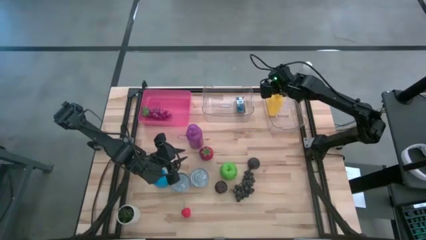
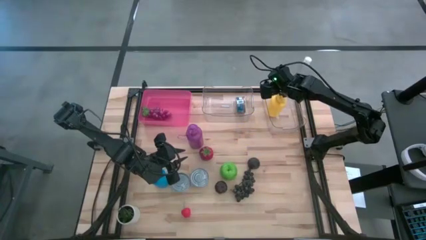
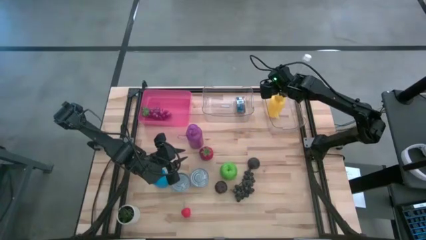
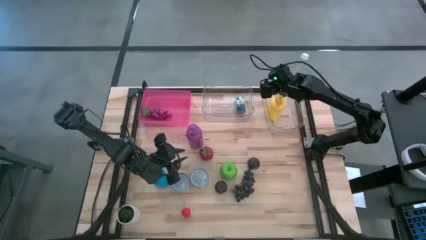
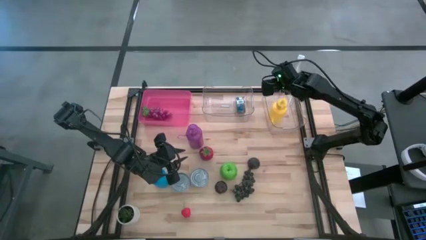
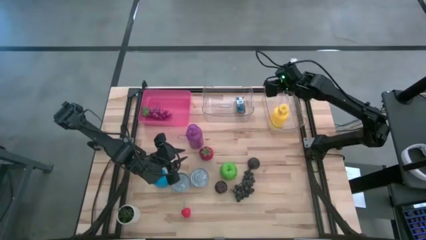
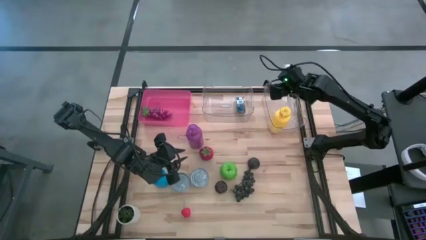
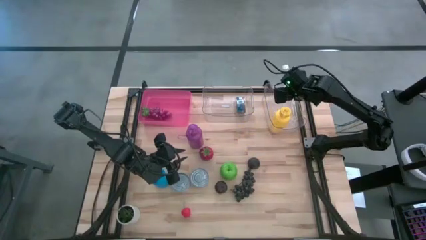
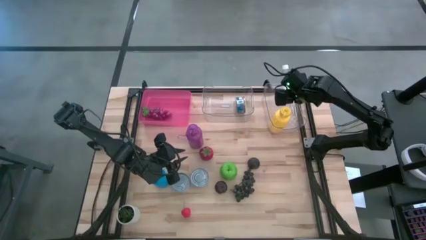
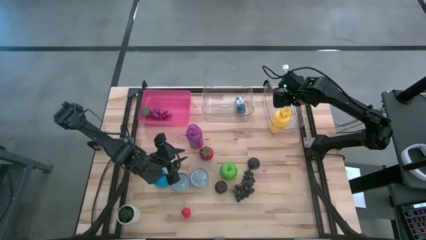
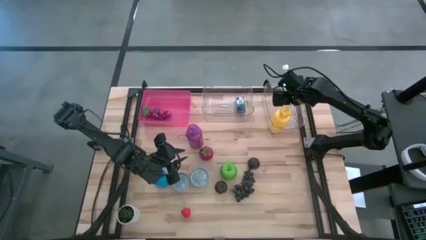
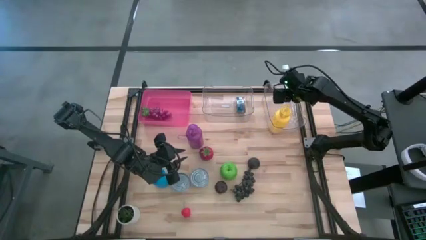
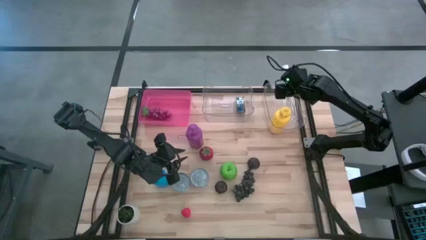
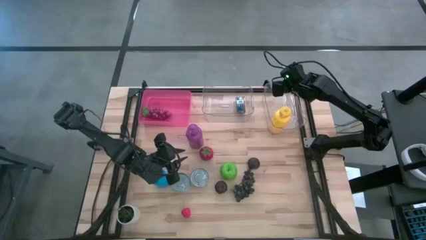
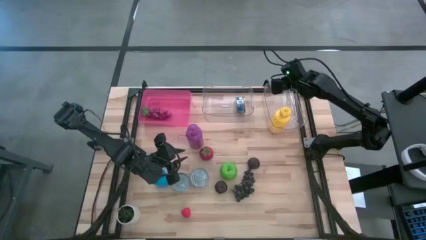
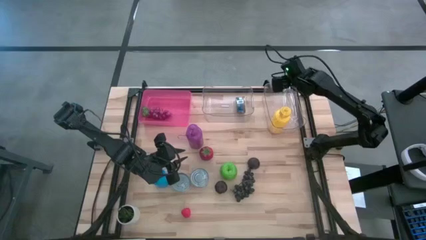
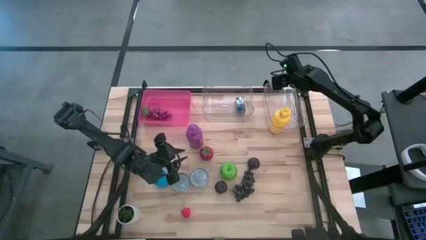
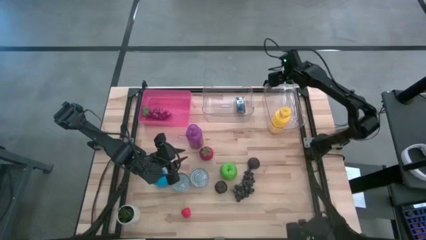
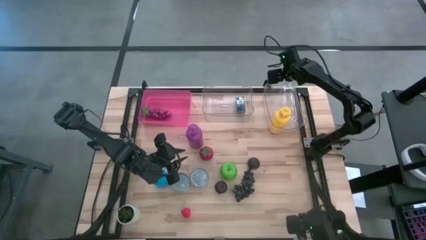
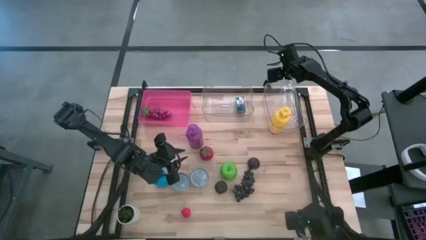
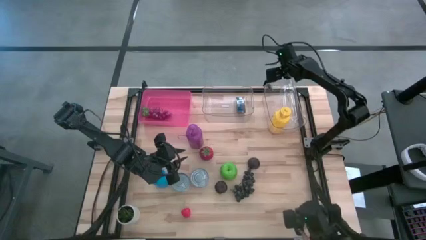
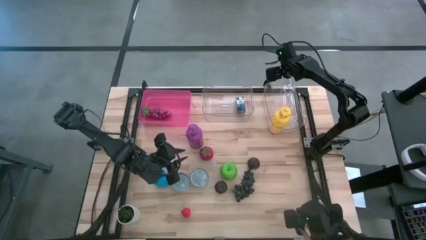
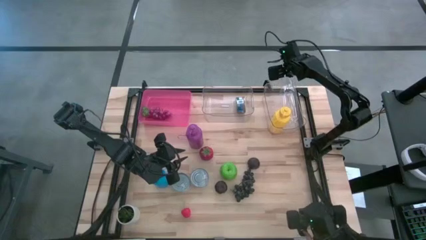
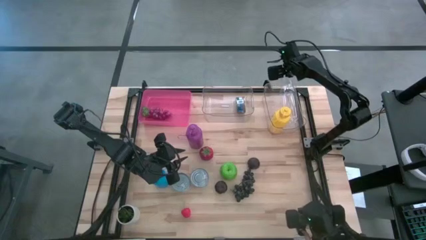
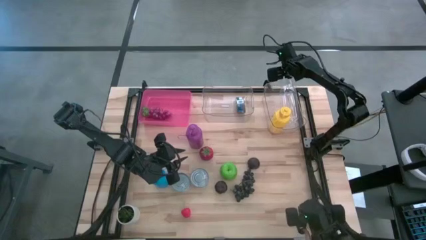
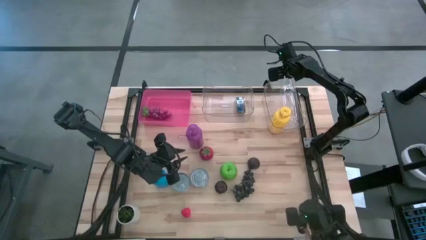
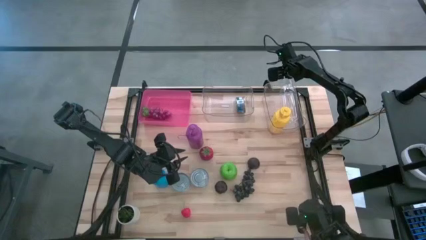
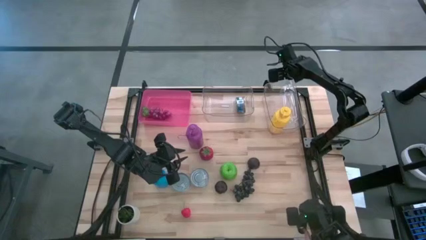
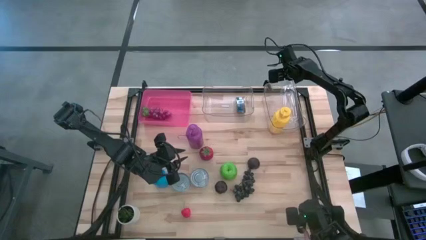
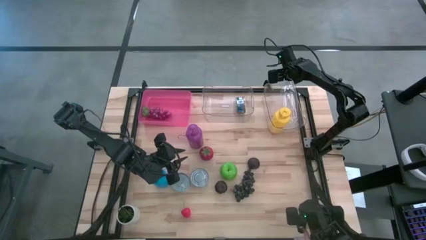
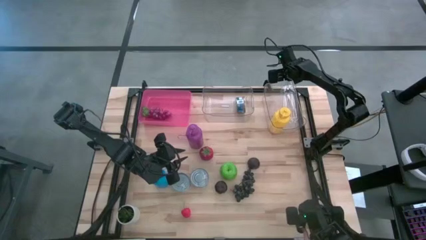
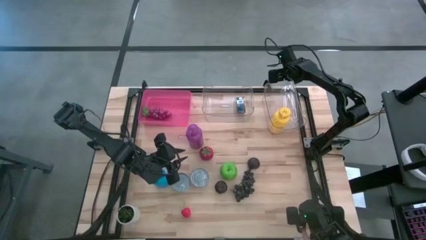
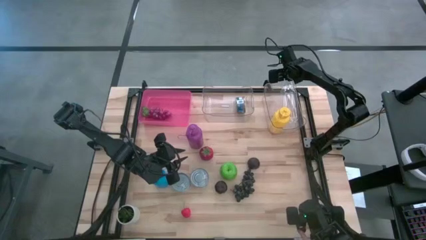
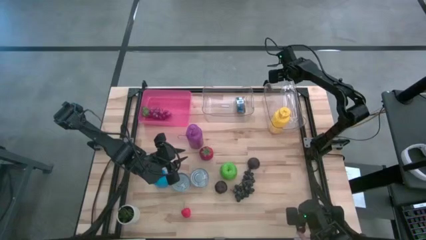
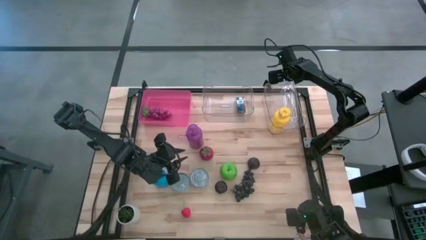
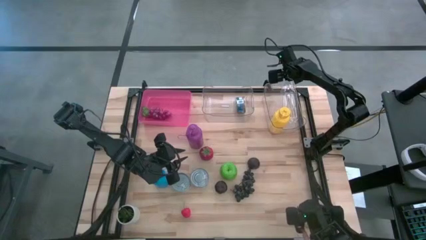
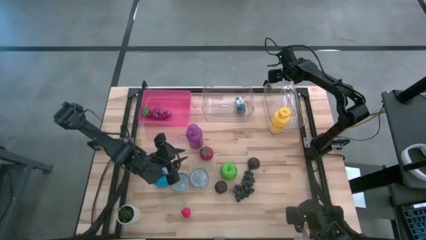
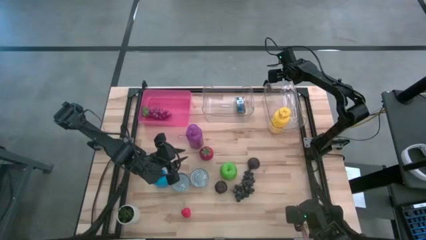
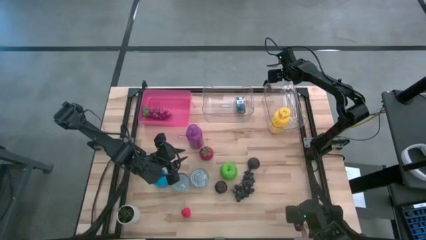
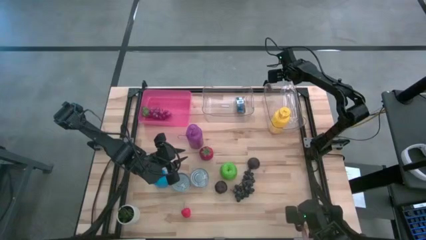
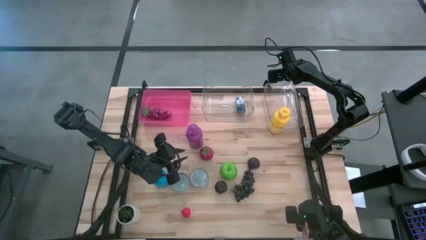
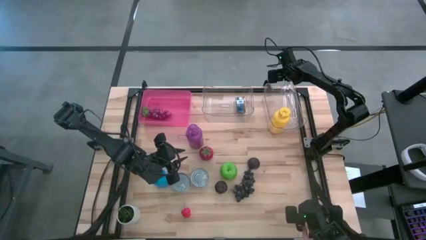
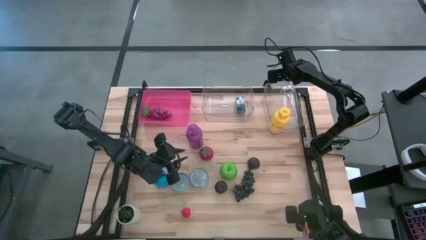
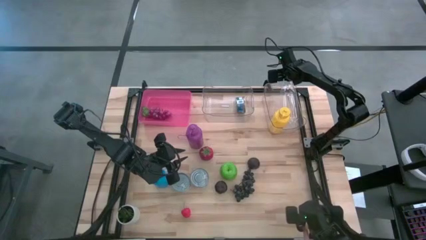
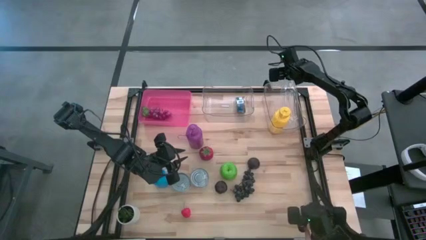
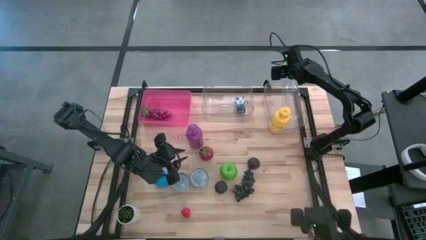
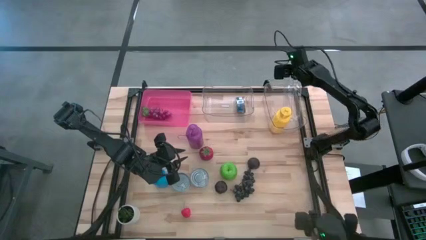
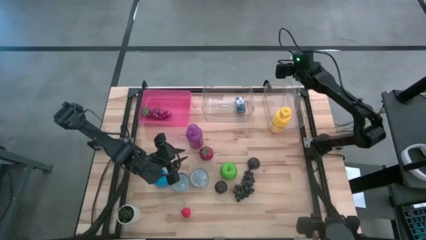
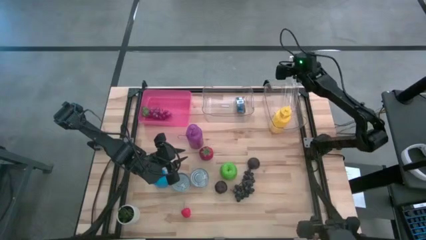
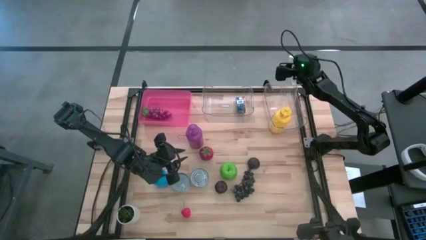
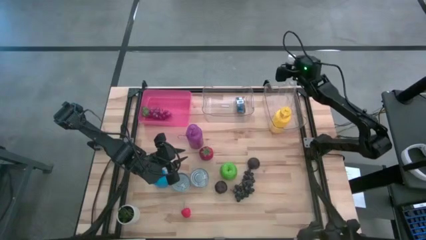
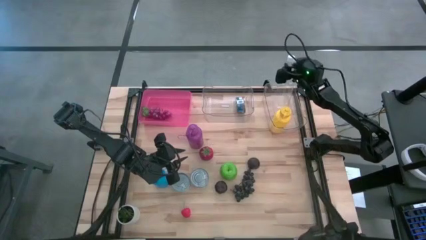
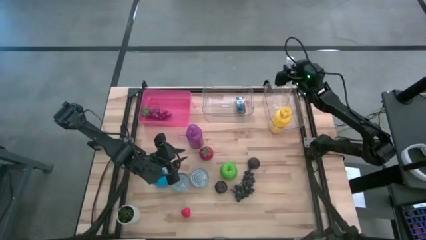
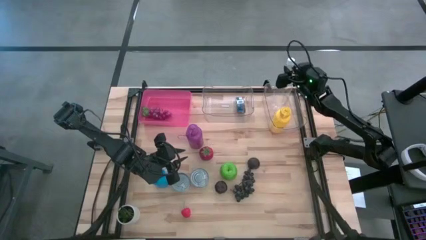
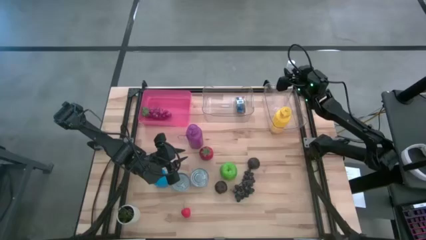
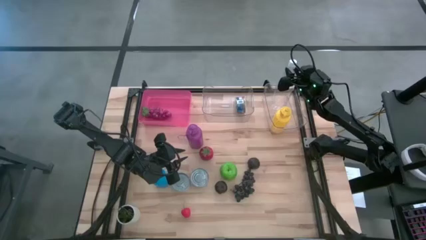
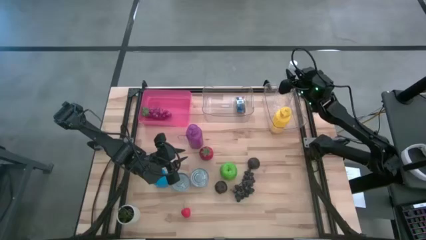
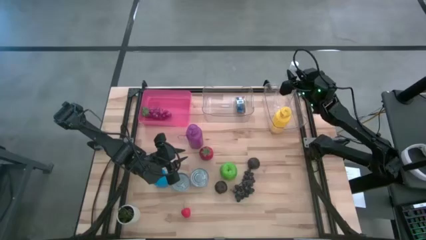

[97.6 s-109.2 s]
Task: Pick & Place Food Item
Adjust the transparent water bottle in the right transparent bin
